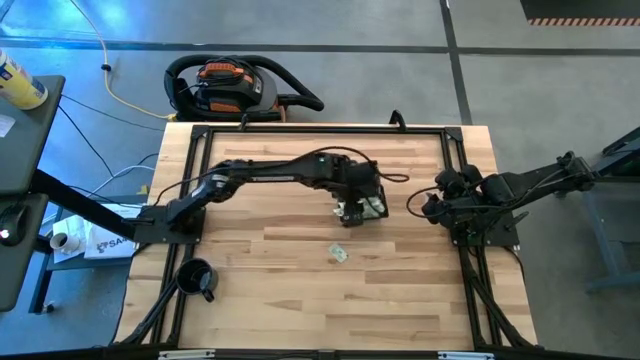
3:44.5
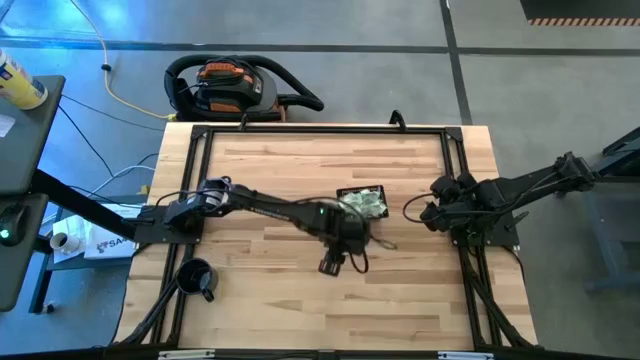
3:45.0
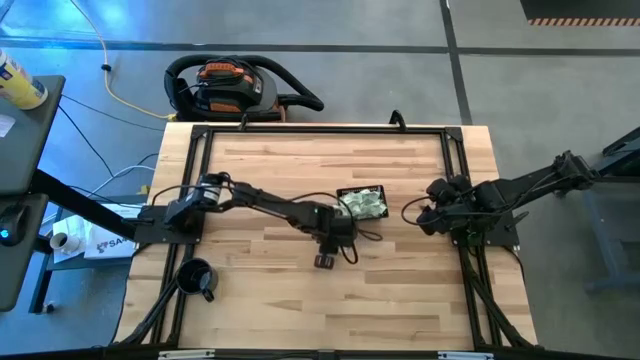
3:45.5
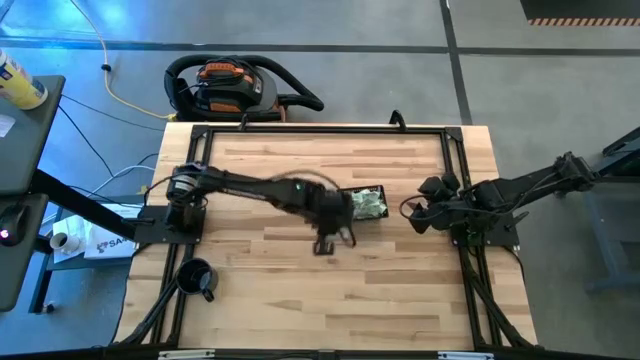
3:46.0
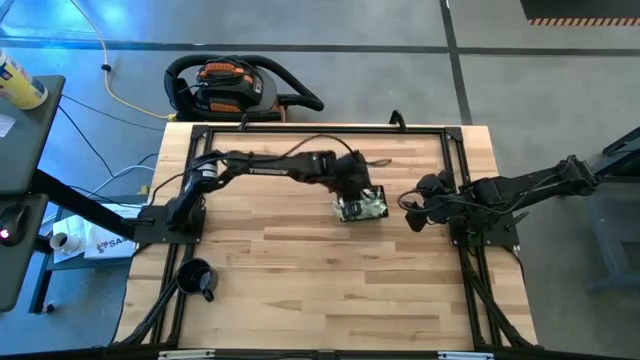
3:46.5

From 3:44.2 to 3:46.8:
Task: Pick and place Stevia / Truvia into bins
Put the green stevia packet into the black bin

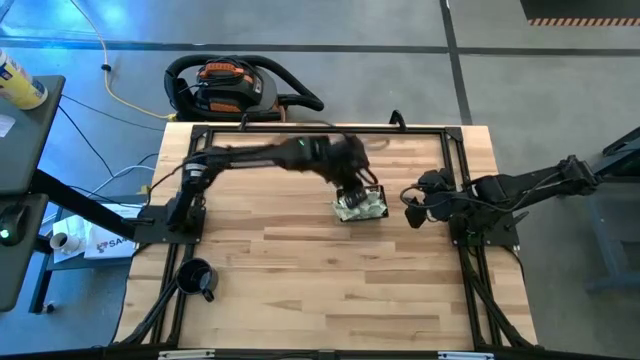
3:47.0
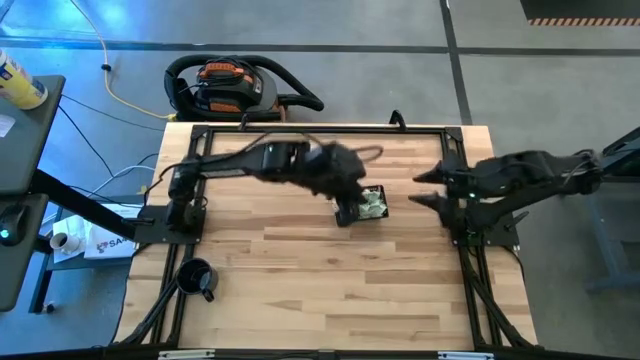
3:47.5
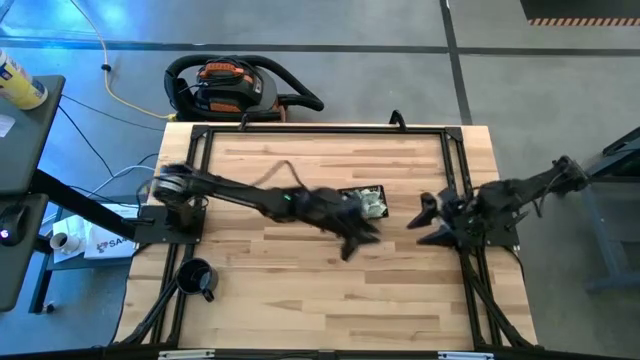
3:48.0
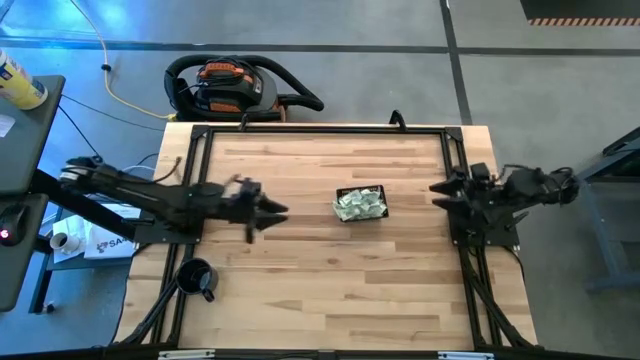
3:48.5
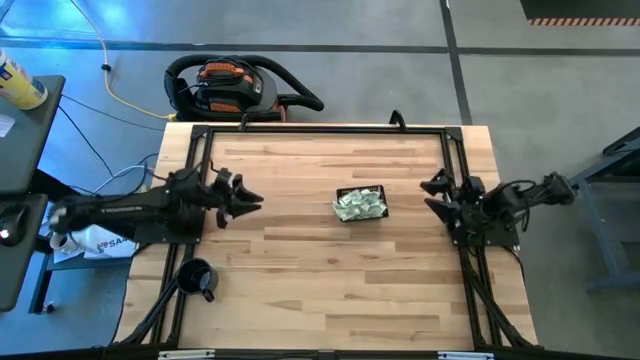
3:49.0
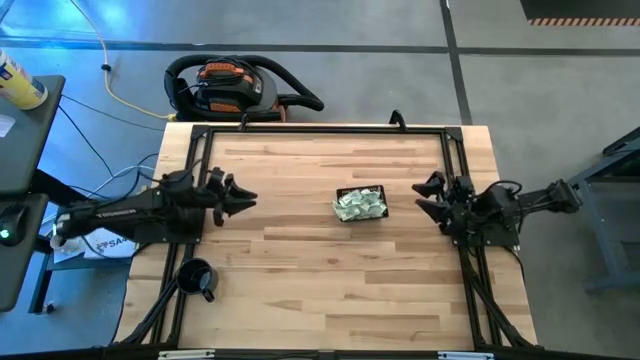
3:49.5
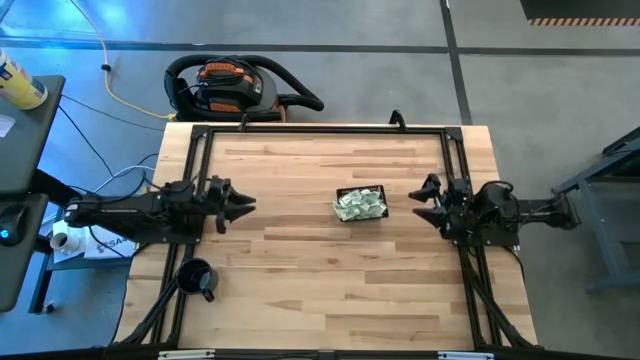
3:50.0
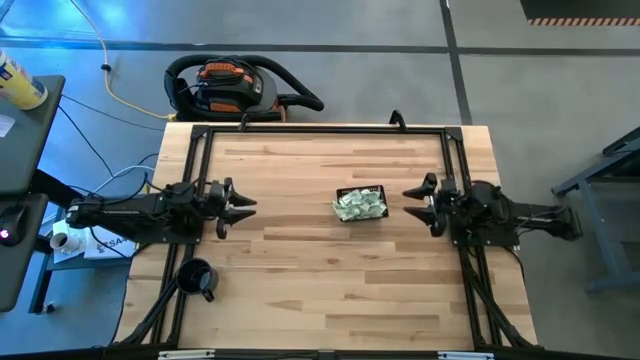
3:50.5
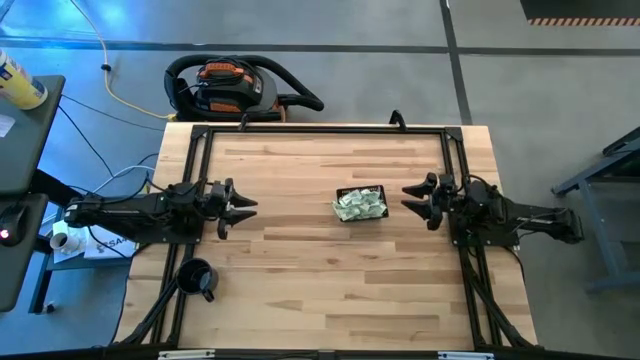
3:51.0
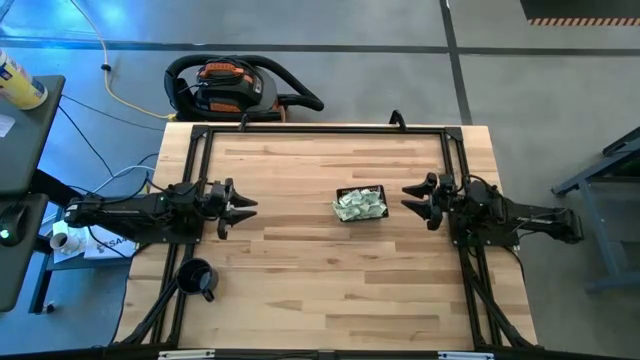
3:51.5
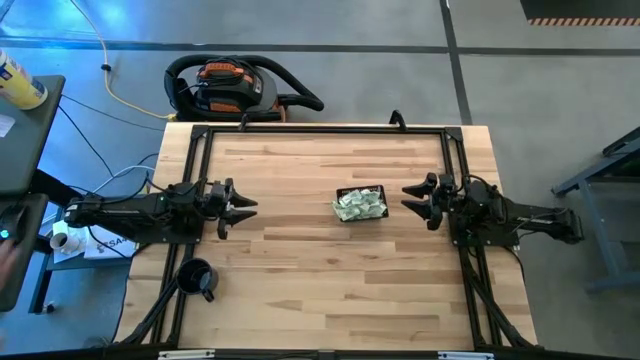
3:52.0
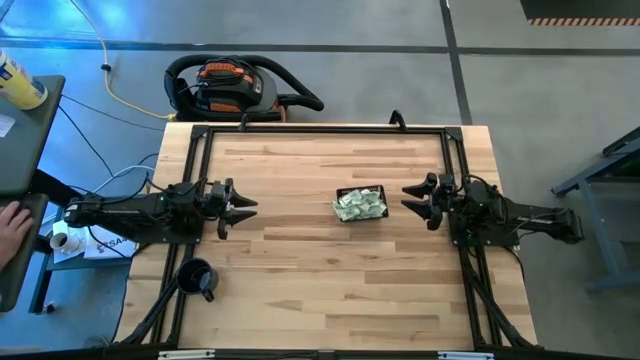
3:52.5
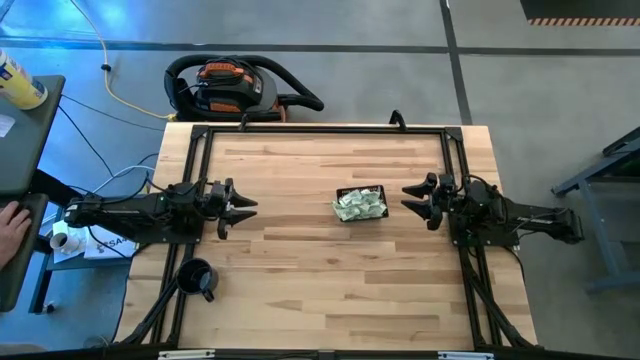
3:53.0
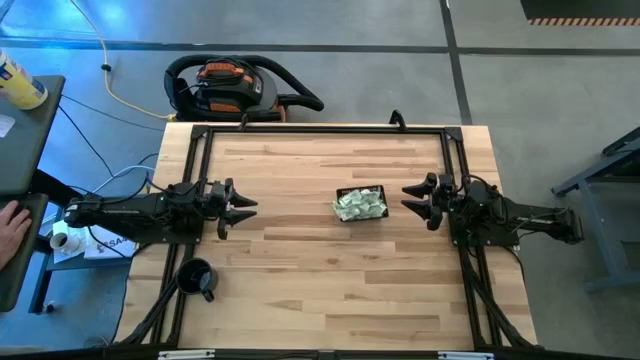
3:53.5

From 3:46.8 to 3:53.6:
Return to Home Position

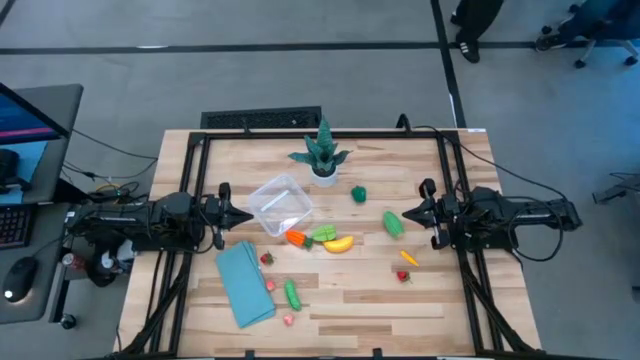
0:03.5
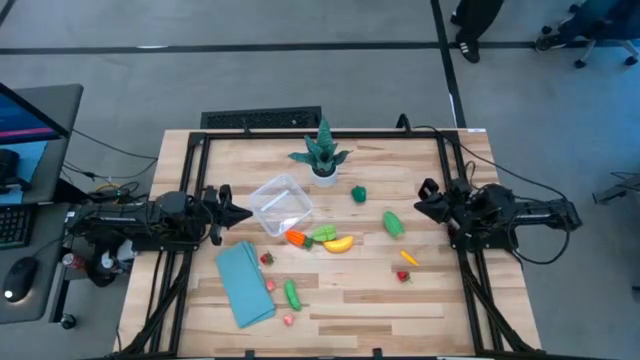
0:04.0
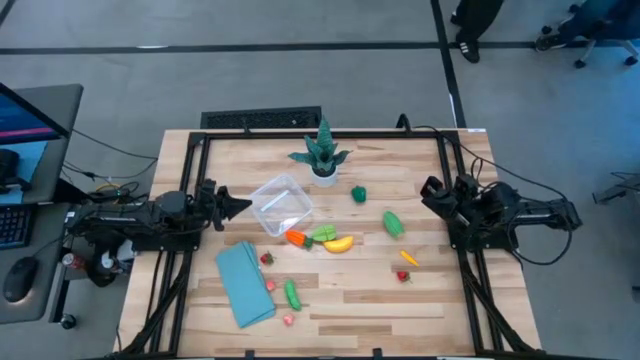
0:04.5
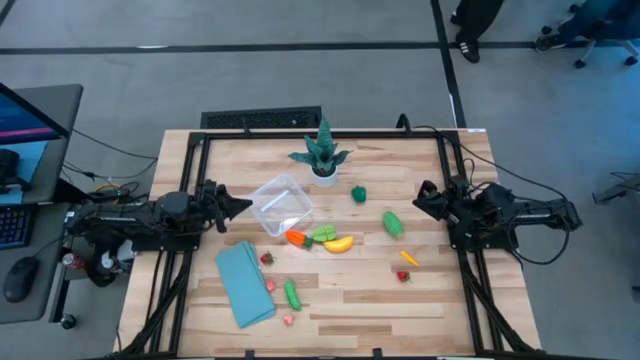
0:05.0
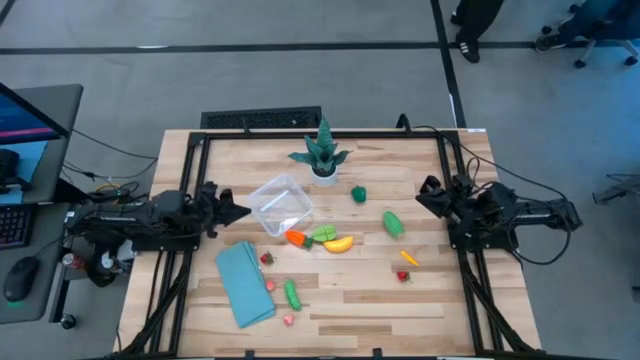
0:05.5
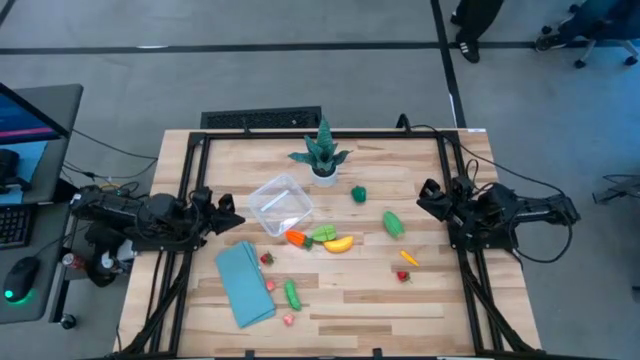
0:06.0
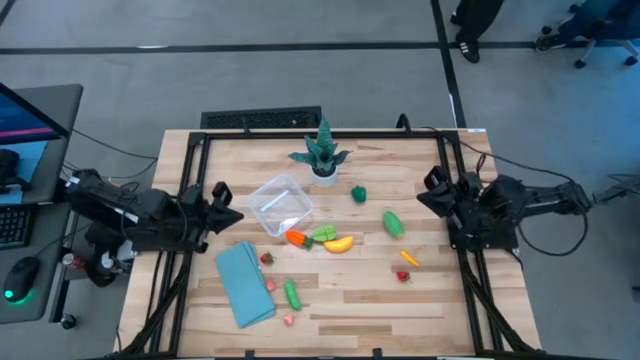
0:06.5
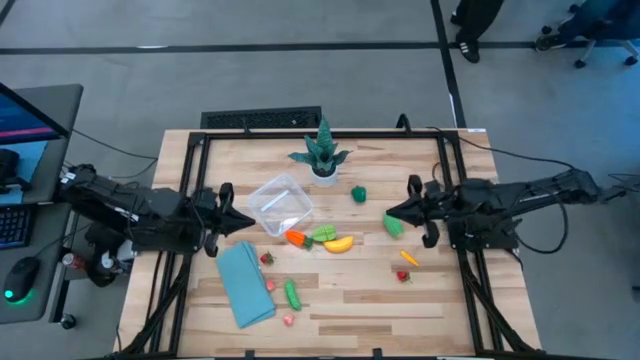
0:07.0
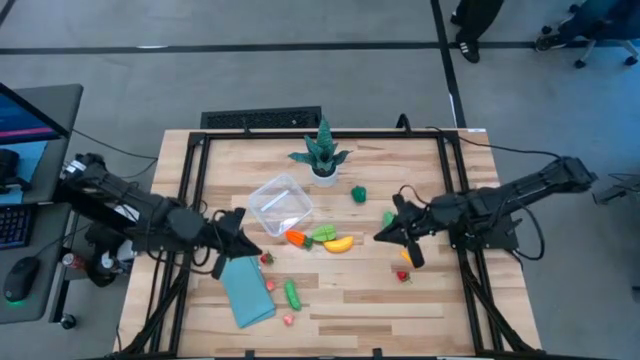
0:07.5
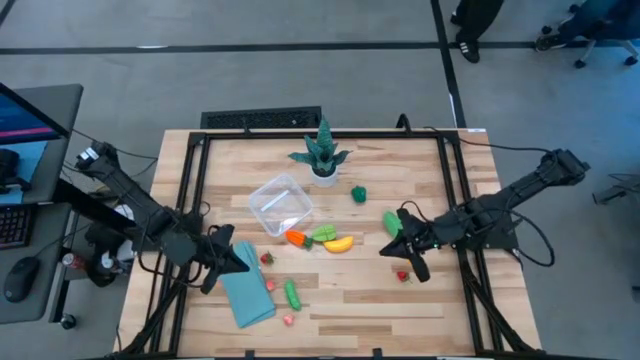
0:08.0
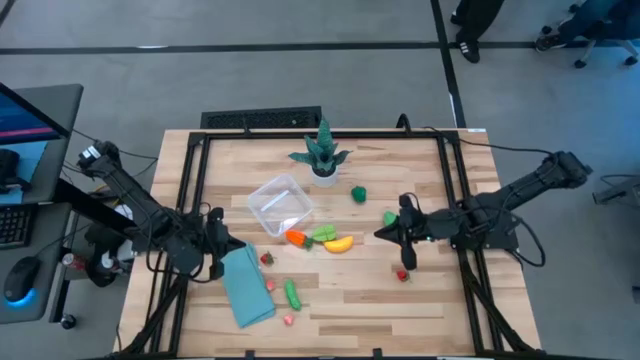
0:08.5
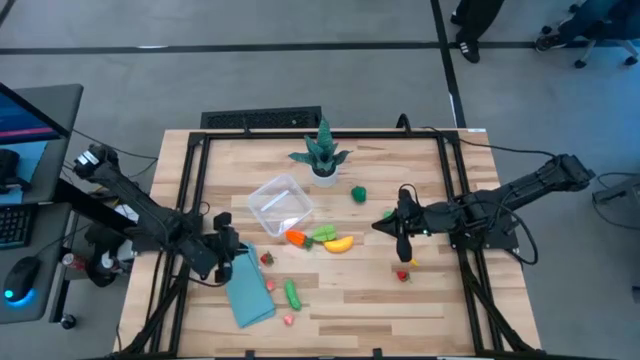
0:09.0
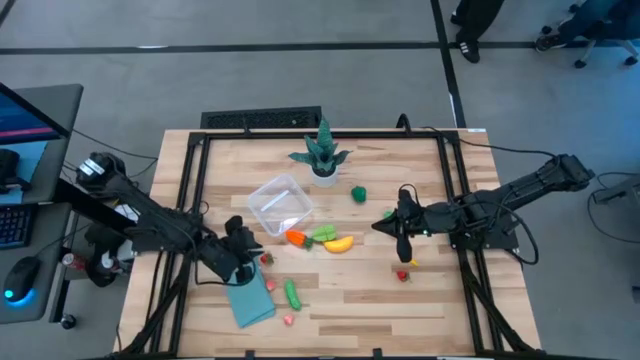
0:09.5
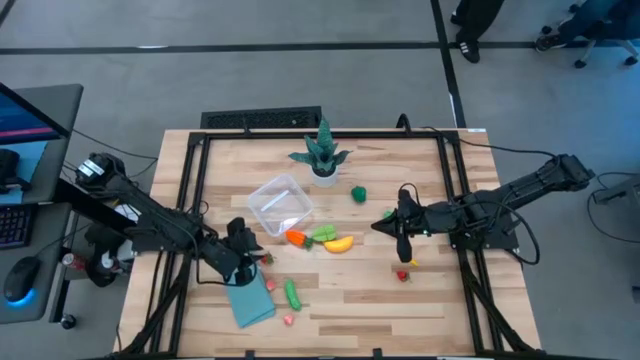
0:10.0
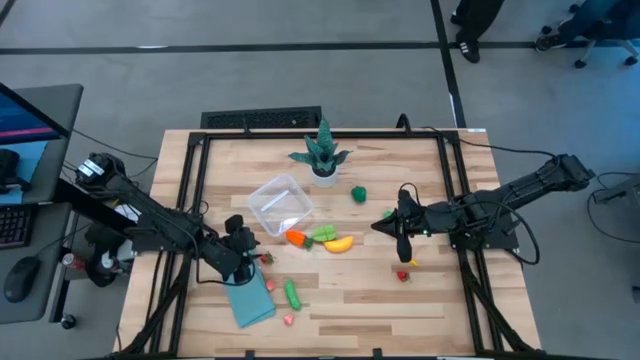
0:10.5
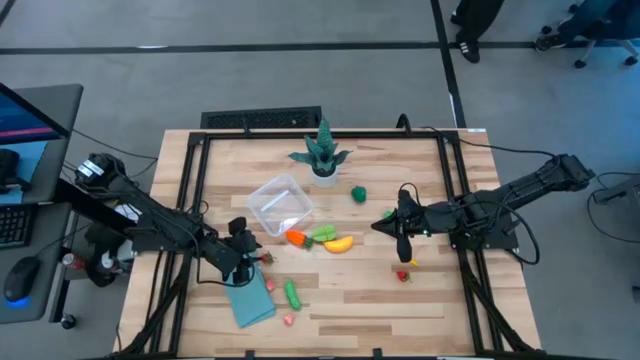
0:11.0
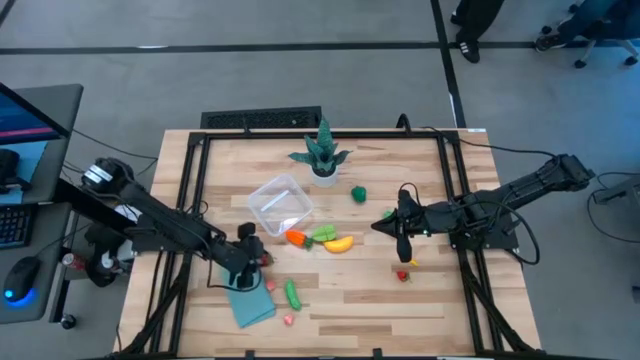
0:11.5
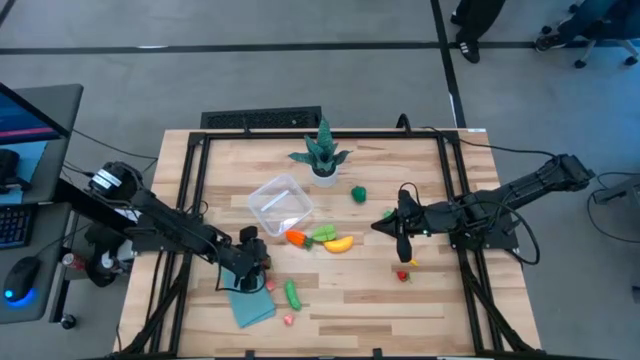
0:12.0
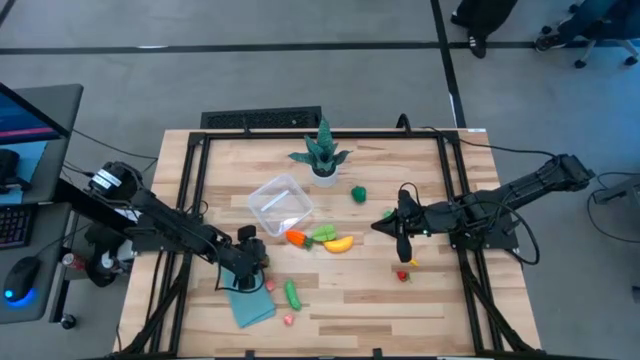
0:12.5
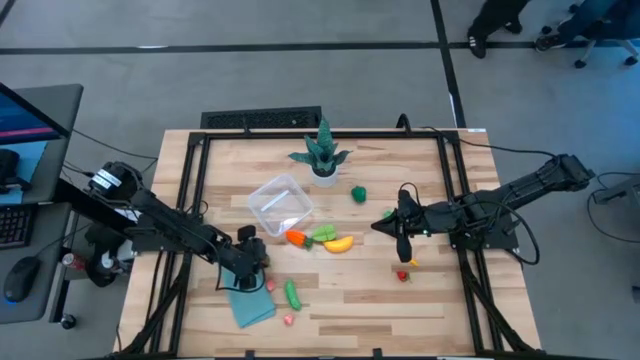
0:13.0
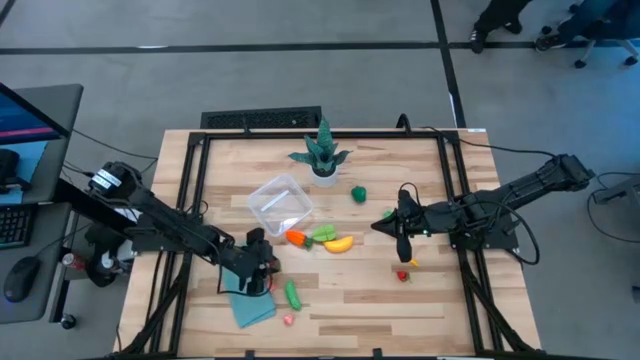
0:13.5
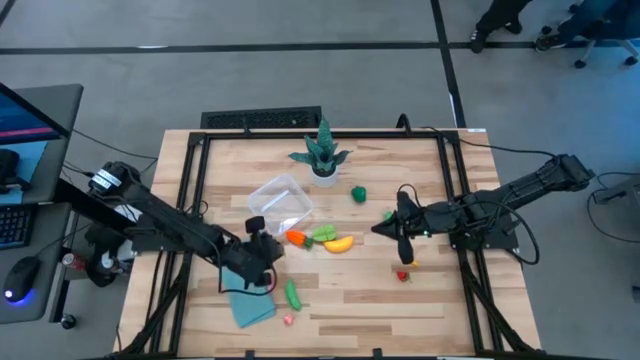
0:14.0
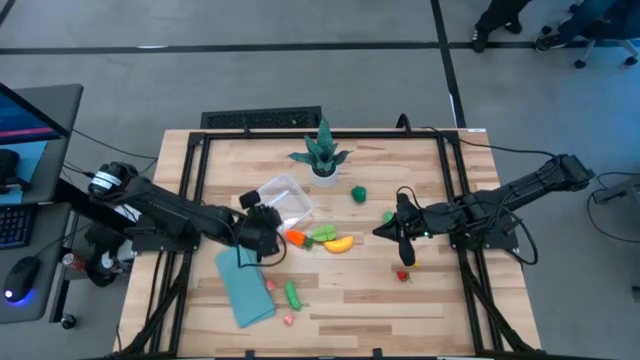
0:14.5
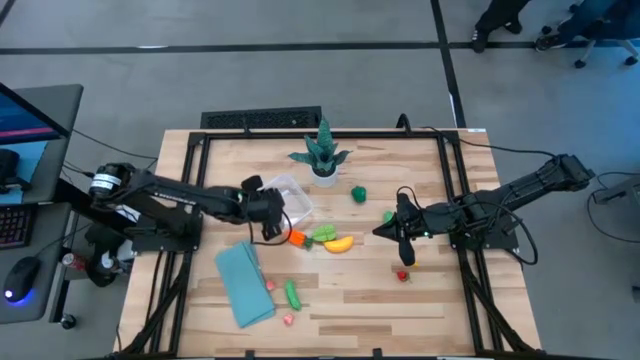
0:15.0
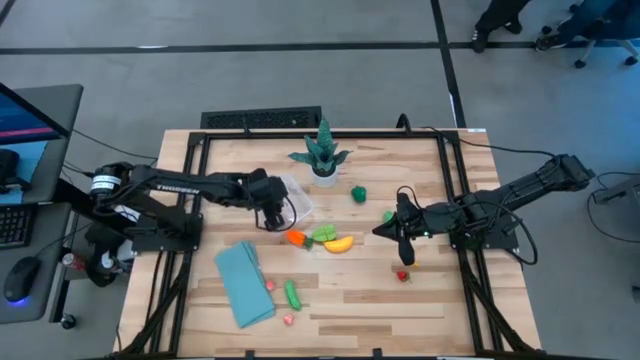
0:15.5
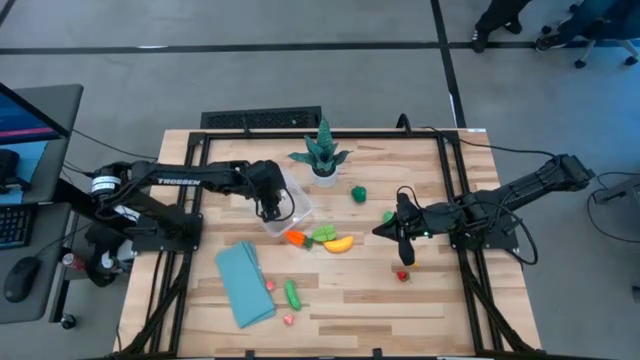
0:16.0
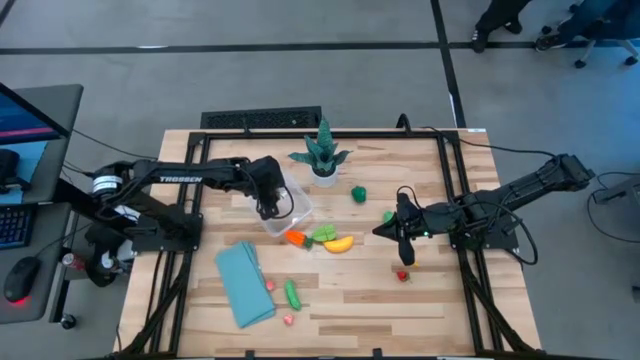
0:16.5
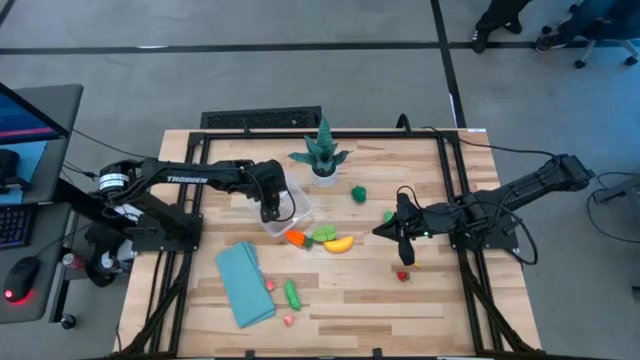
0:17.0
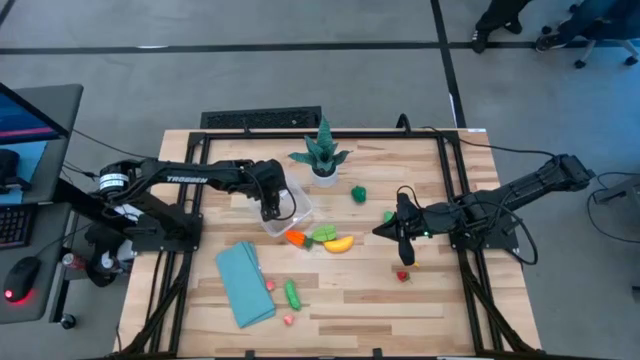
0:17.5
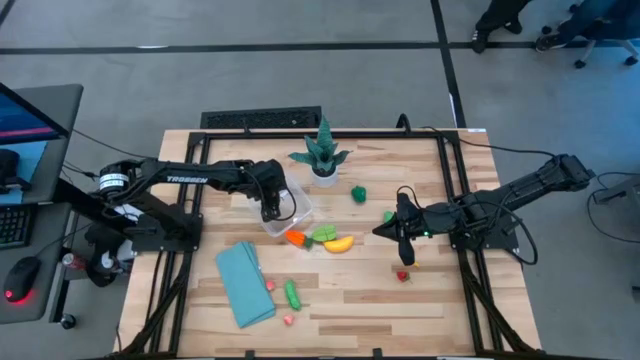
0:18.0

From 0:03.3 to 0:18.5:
Task: Pick and placing Produce into tupperware
Put the left red strawberry into the transparent container
